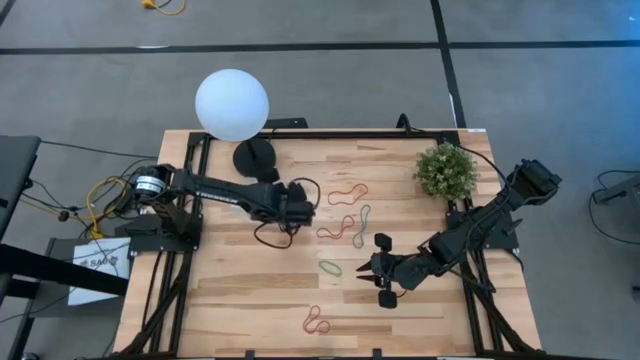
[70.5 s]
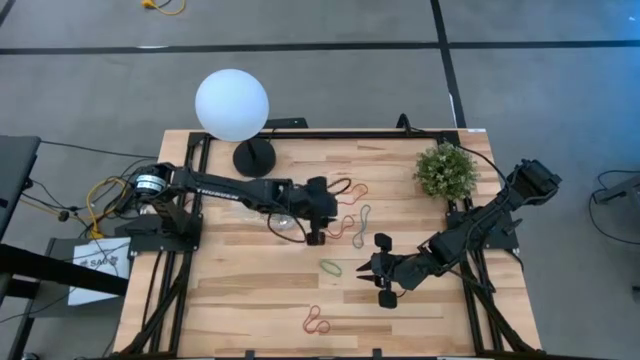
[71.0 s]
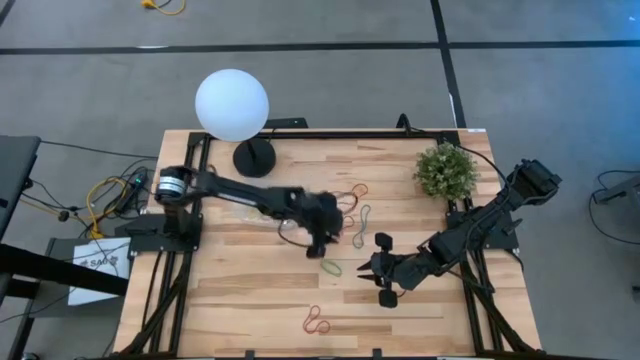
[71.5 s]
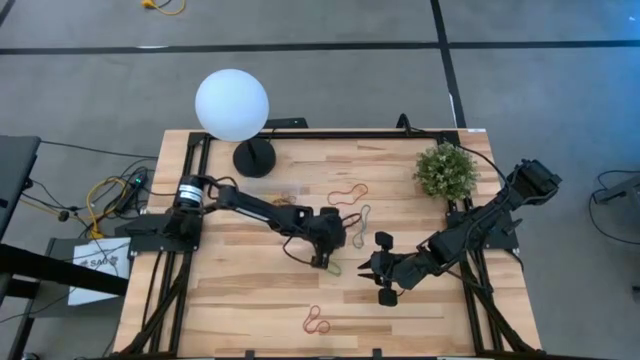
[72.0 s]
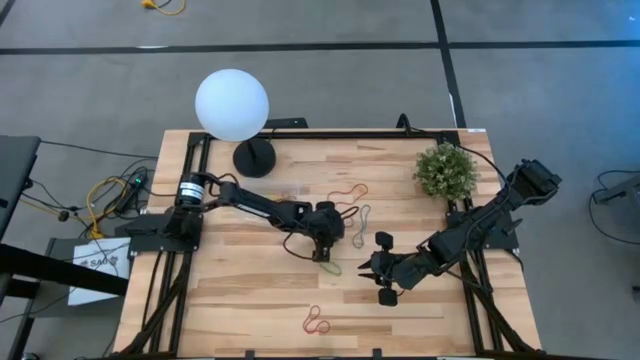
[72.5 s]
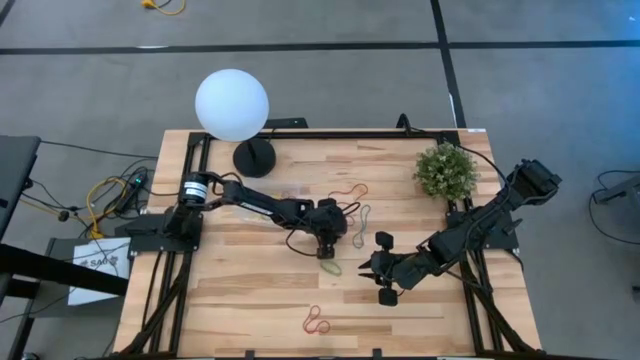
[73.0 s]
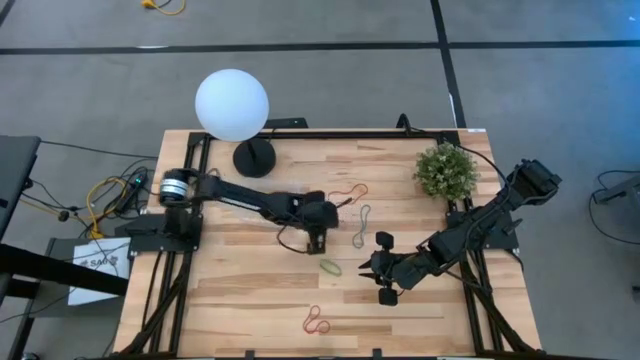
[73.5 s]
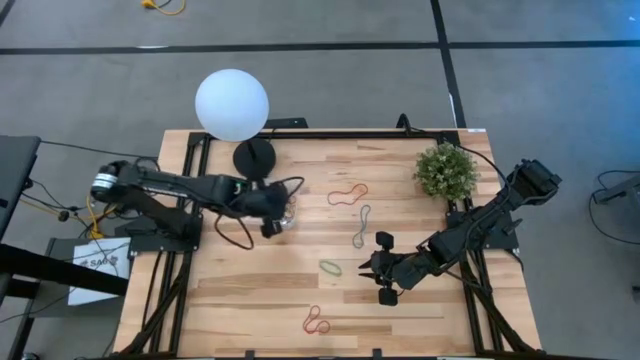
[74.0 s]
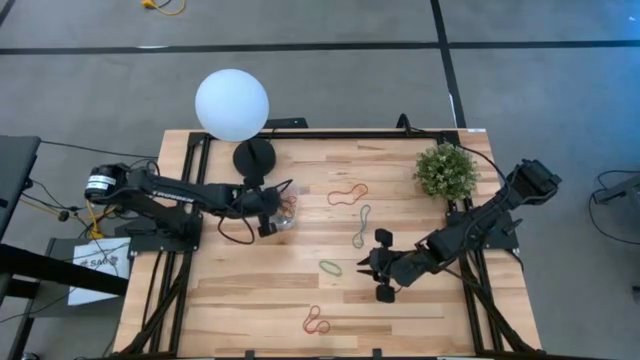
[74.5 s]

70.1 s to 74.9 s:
Task: Pick and place rubber bands into bin
Put the red rubber band into the transparent container

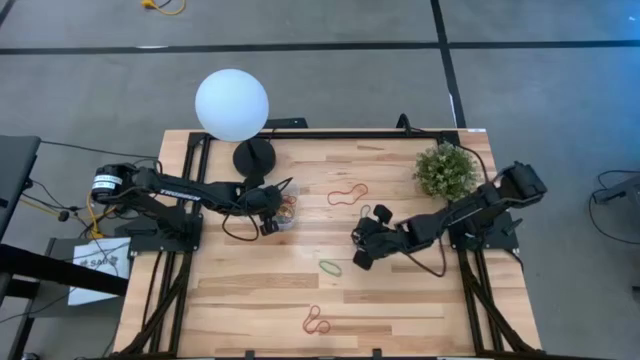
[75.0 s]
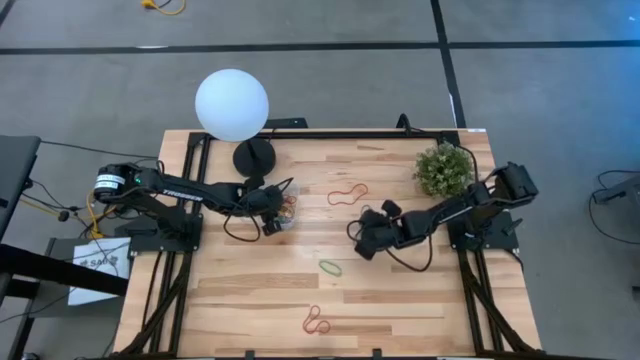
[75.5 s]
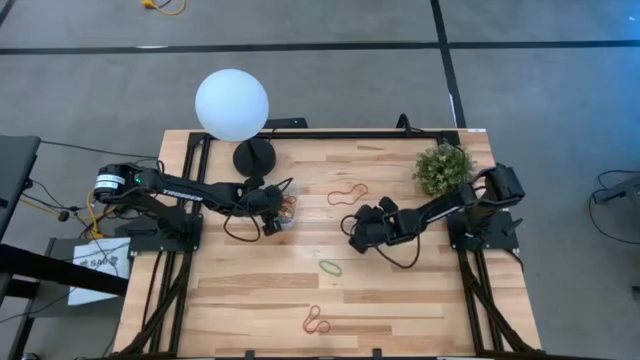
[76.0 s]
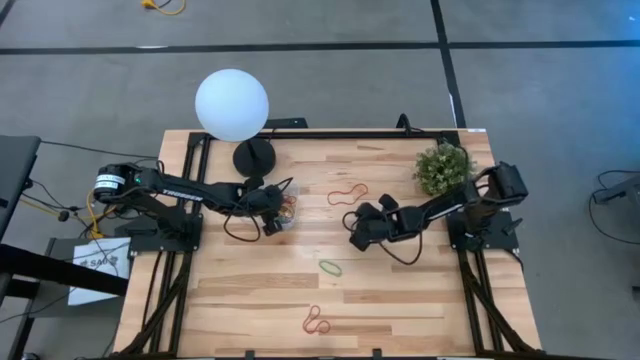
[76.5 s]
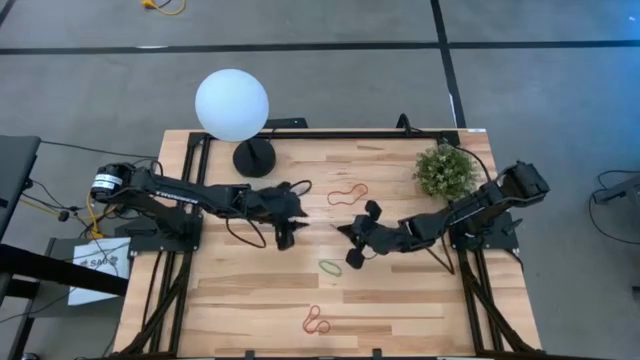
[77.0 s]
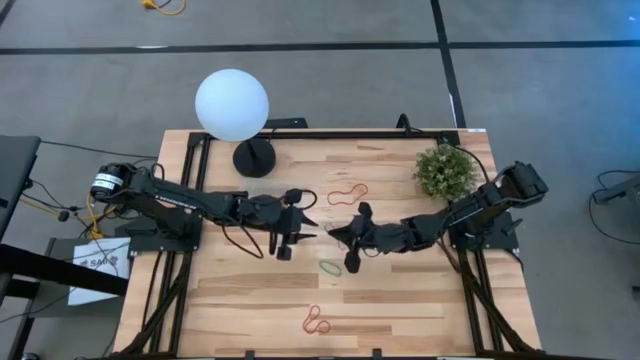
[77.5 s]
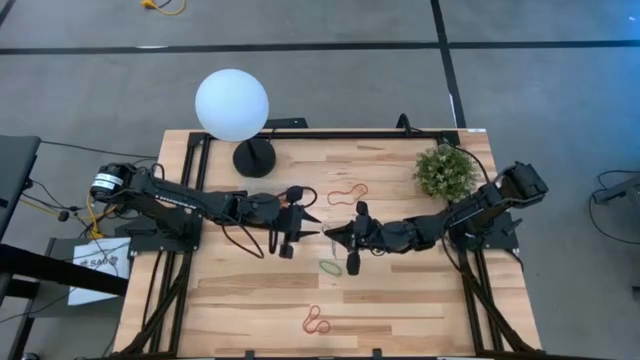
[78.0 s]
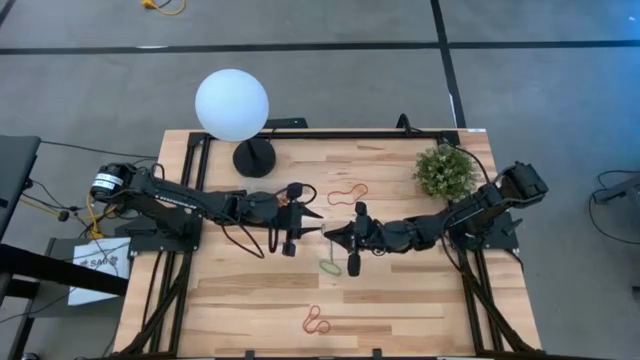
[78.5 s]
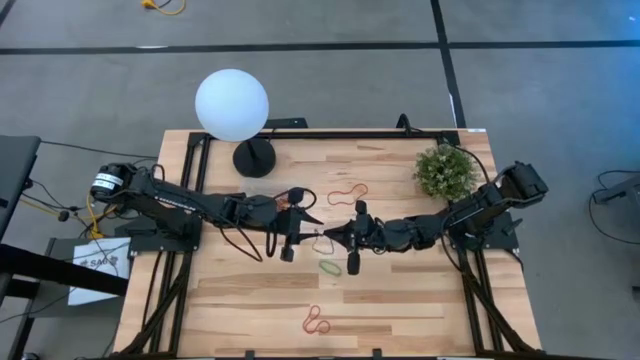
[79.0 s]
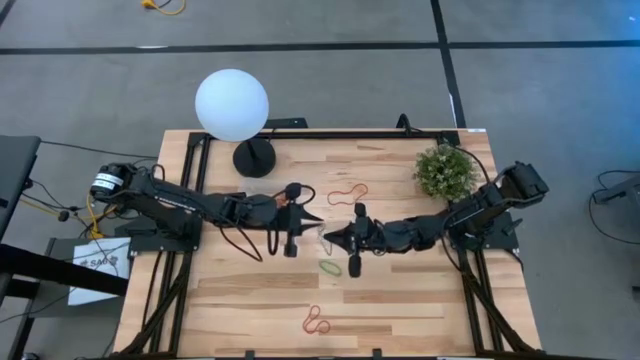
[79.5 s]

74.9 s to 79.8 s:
Put the blue rubber band into the transparent container

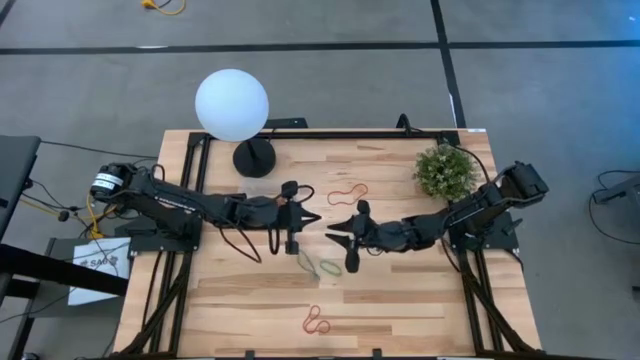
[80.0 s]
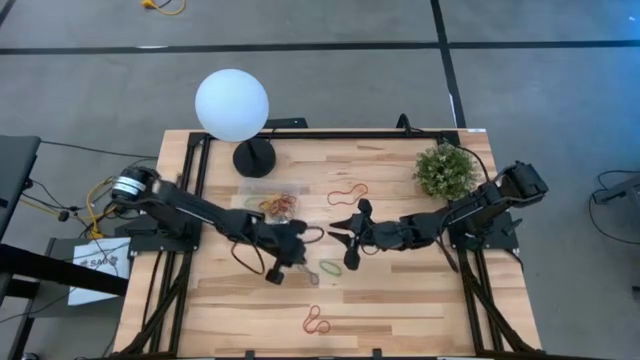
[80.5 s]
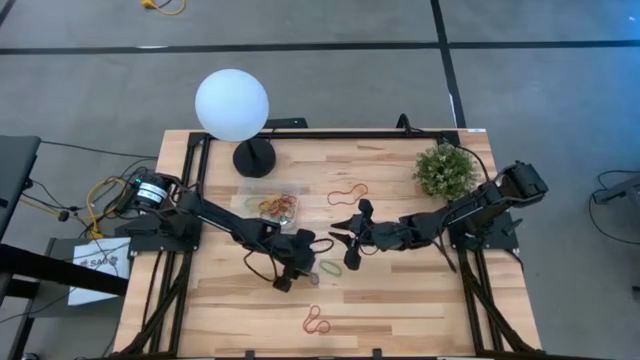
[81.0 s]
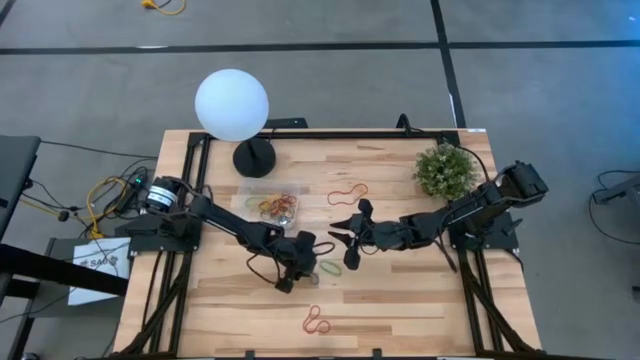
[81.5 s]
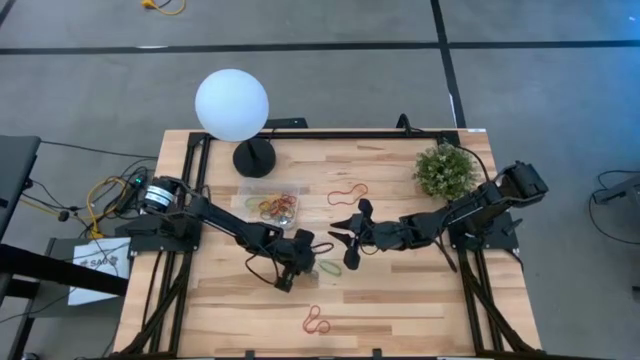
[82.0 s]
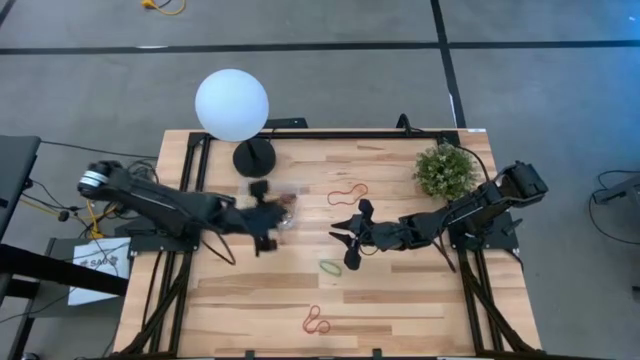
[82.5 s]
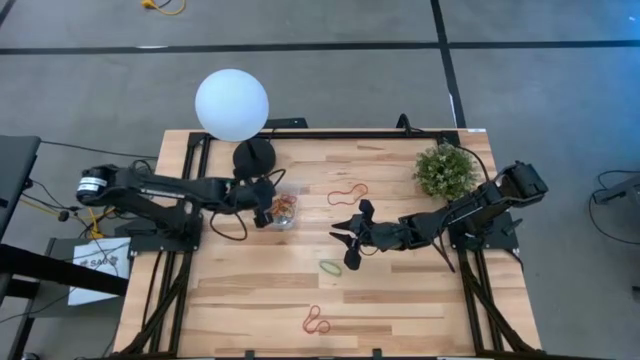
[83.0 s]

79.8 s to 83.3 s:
Put the blue rubber band into the transparent container

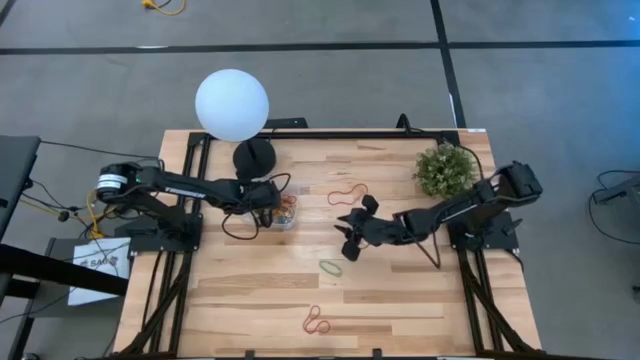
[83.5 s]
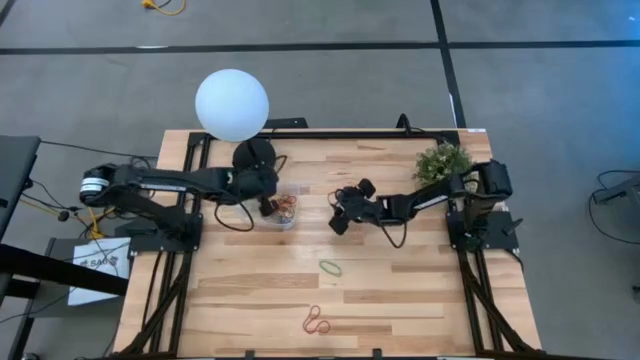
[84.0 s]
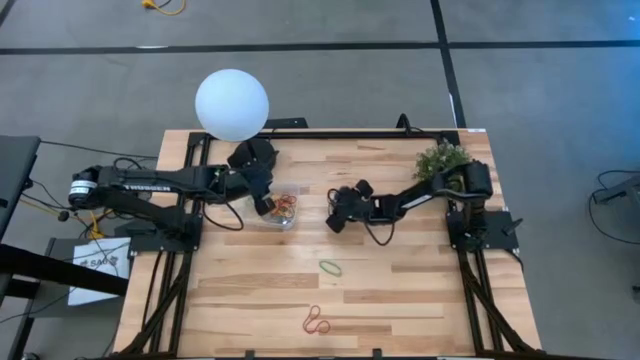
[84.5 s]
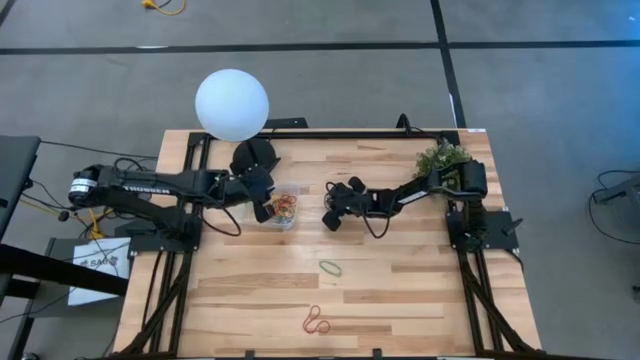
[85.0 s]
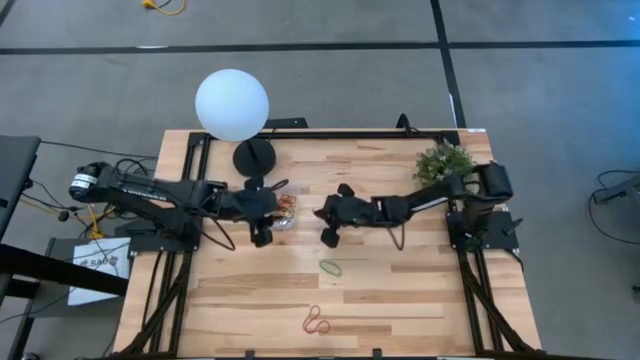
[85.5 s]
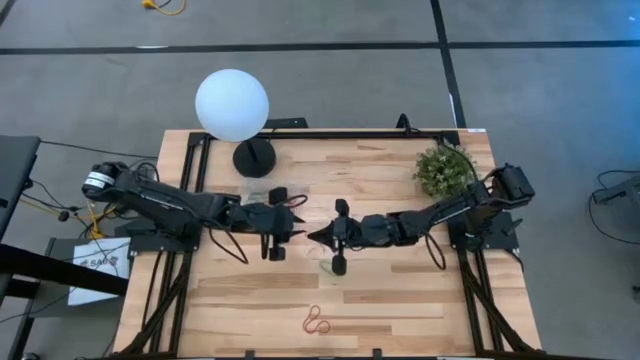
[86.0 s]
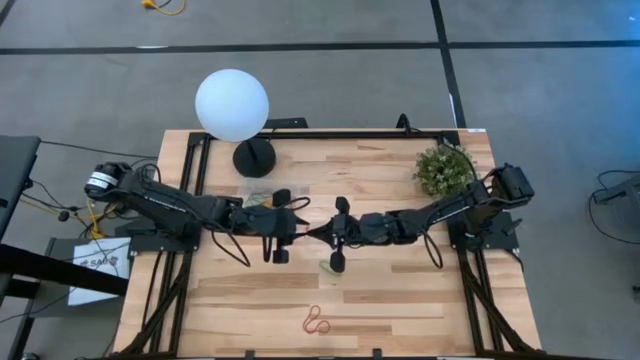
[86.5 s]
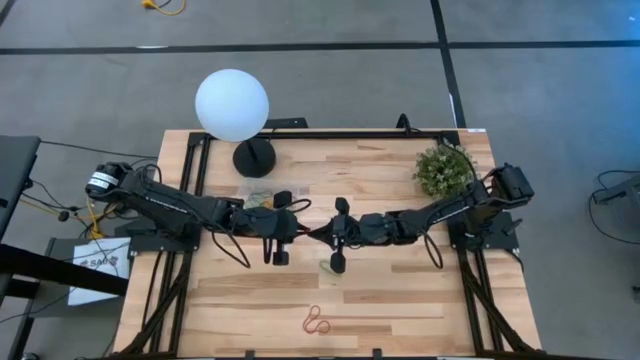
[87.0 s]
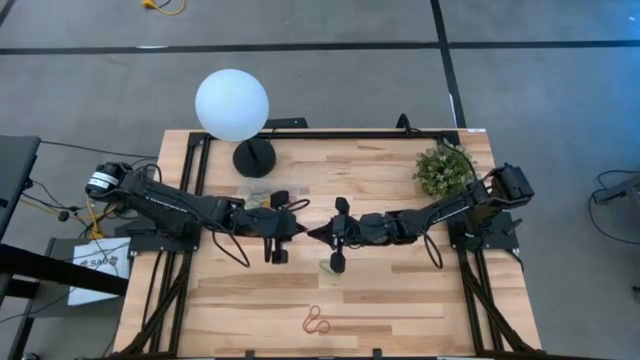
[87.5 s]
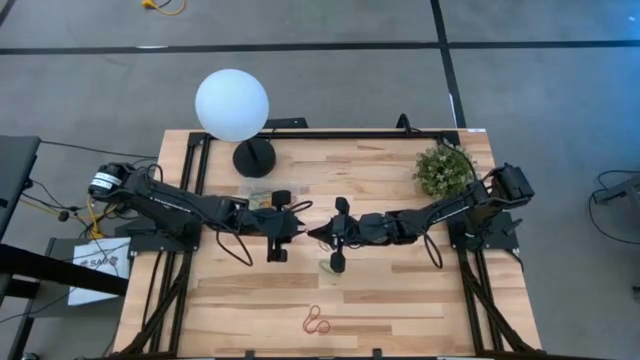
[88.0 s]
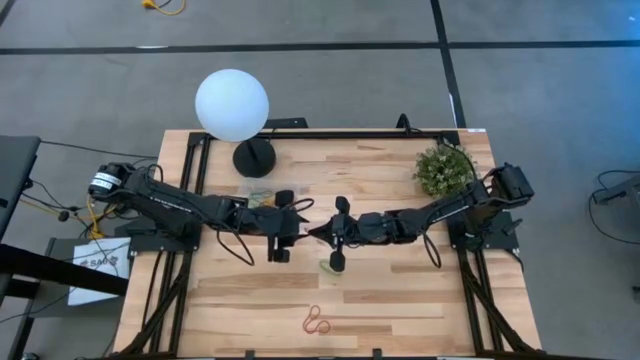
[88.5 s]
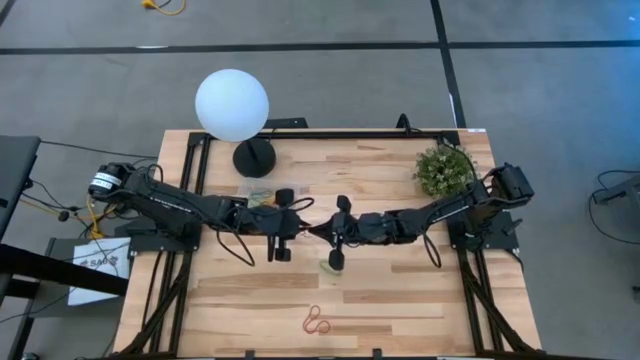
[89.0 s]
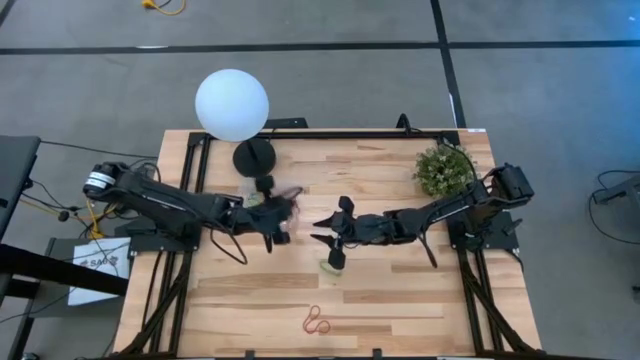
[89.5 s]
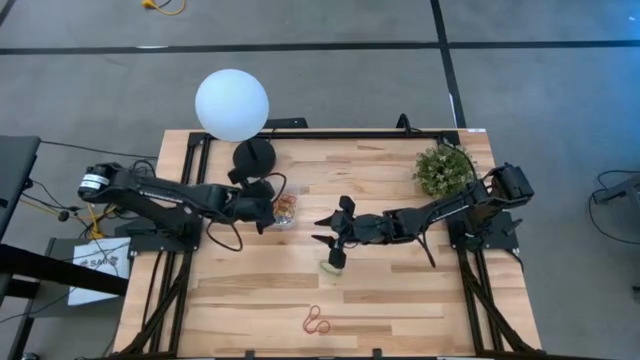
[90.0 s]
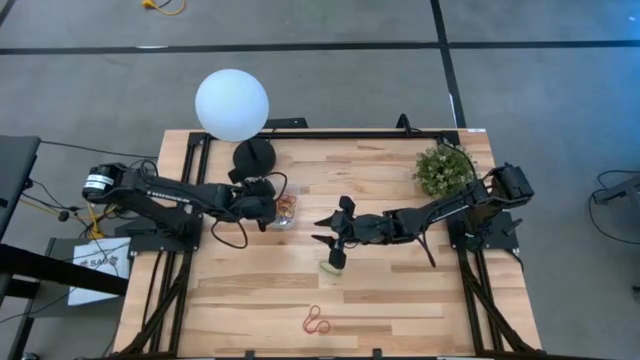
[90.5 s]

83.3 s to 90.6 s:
Put the red rubber band into the transparent container
